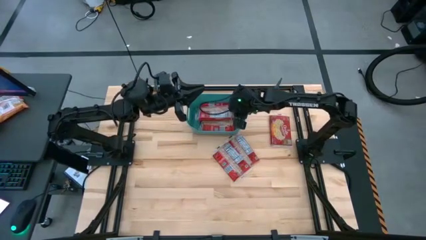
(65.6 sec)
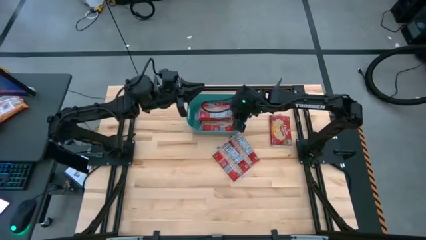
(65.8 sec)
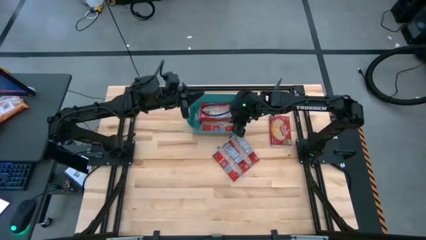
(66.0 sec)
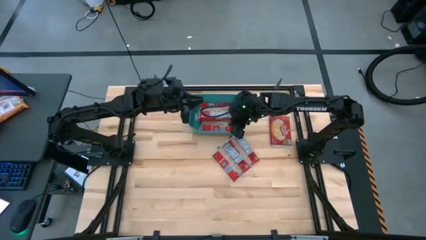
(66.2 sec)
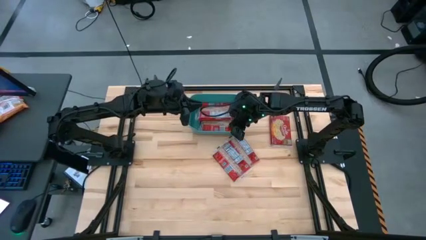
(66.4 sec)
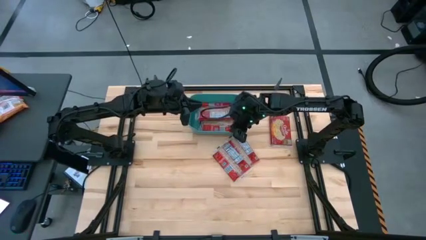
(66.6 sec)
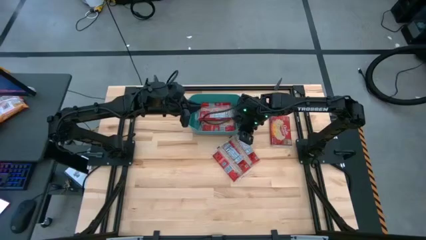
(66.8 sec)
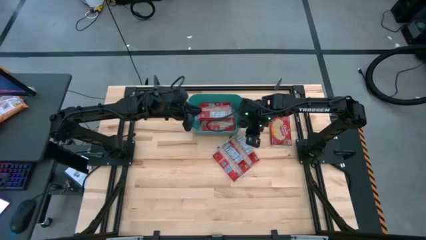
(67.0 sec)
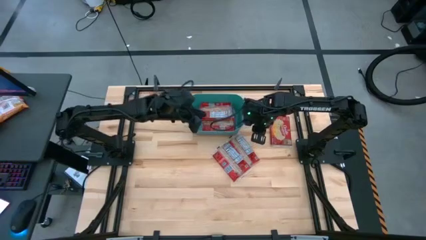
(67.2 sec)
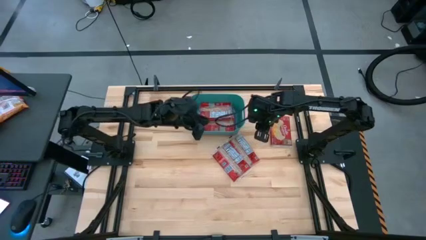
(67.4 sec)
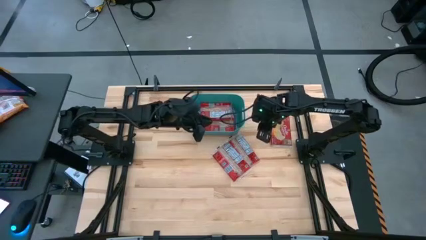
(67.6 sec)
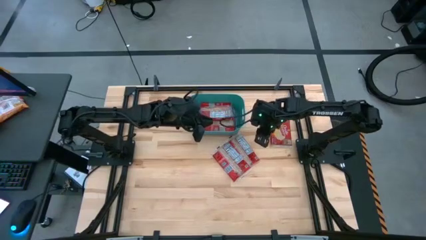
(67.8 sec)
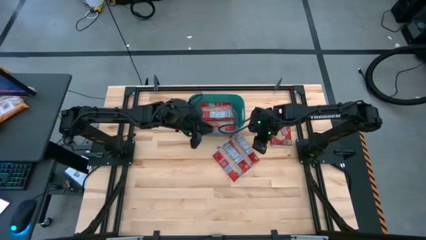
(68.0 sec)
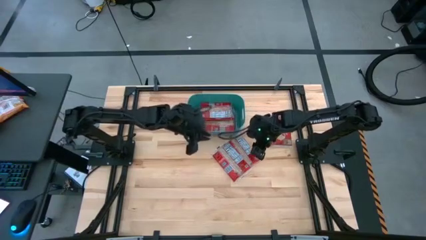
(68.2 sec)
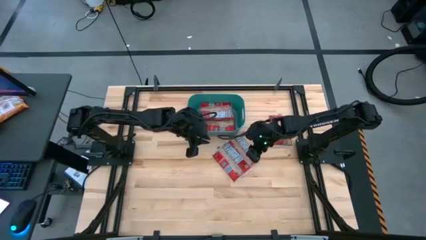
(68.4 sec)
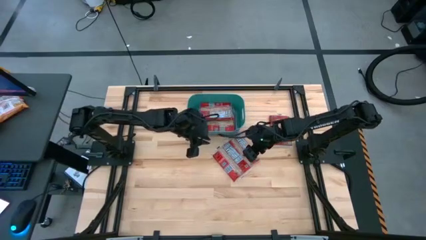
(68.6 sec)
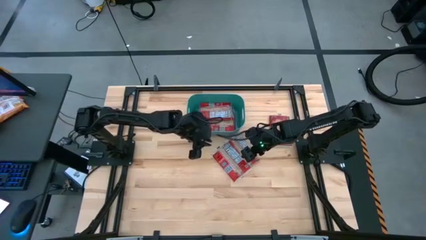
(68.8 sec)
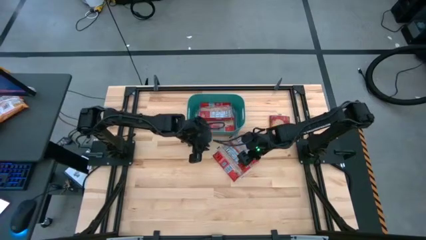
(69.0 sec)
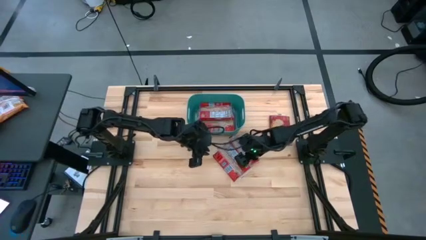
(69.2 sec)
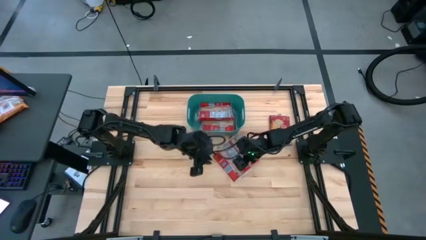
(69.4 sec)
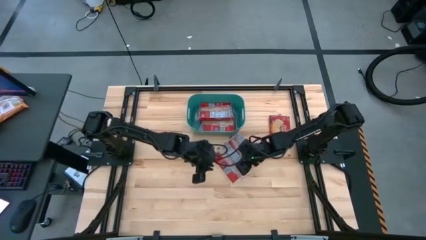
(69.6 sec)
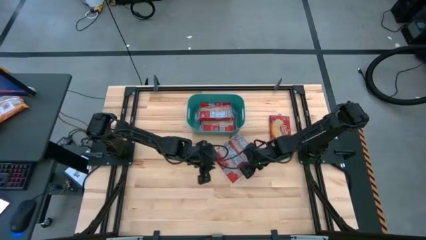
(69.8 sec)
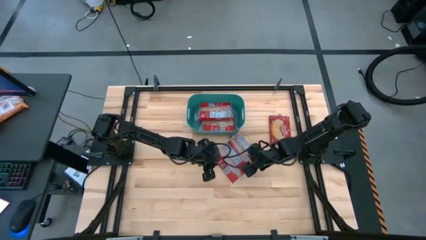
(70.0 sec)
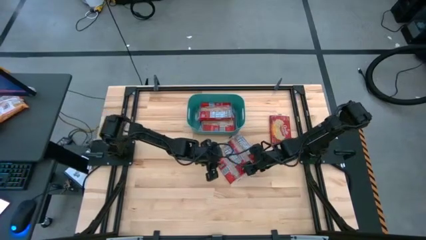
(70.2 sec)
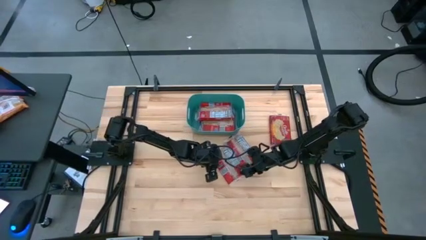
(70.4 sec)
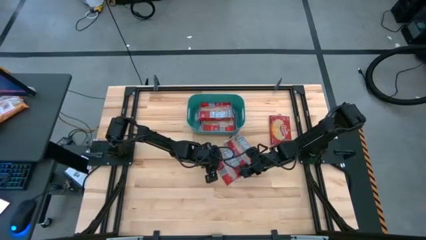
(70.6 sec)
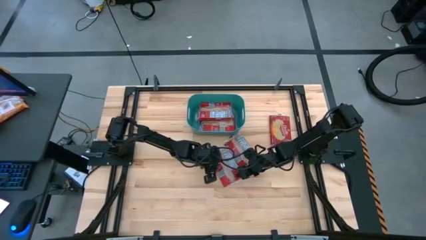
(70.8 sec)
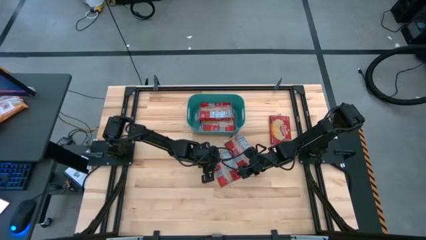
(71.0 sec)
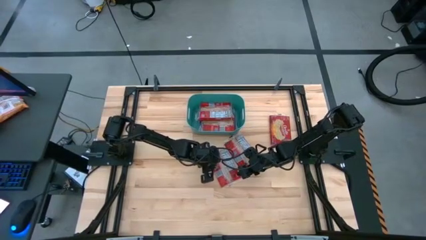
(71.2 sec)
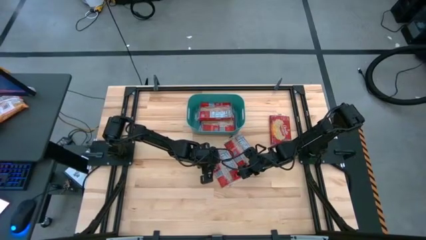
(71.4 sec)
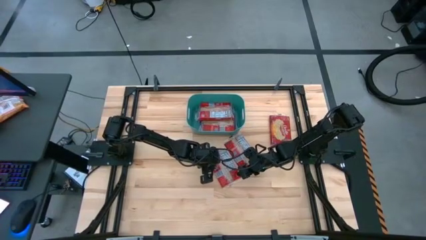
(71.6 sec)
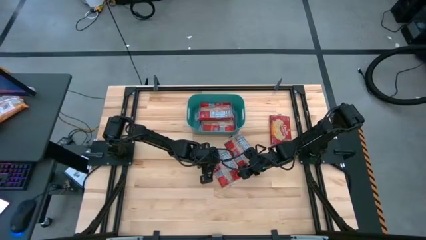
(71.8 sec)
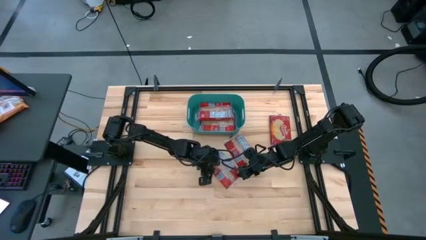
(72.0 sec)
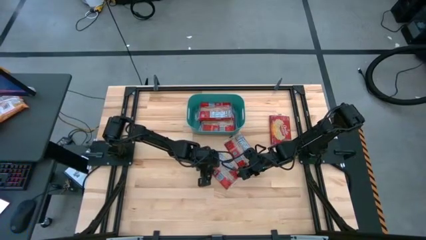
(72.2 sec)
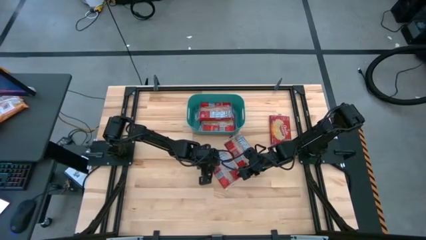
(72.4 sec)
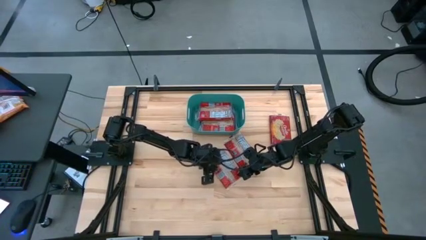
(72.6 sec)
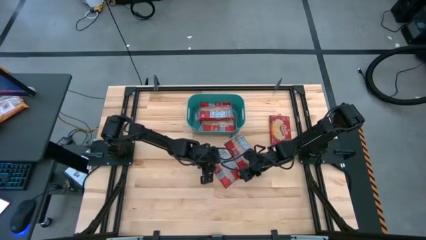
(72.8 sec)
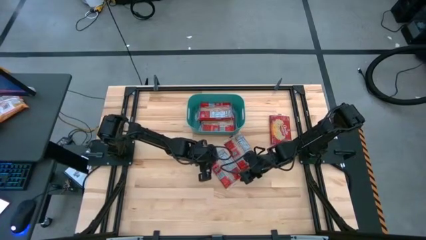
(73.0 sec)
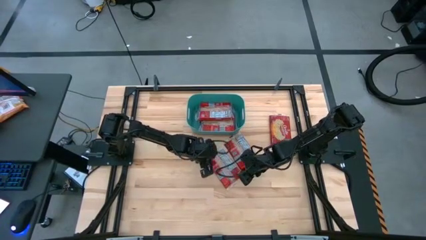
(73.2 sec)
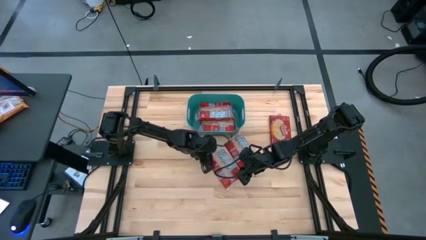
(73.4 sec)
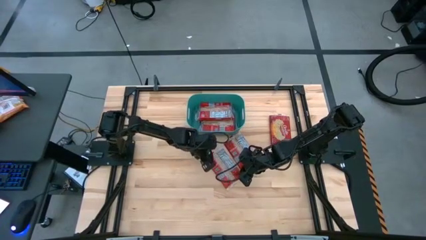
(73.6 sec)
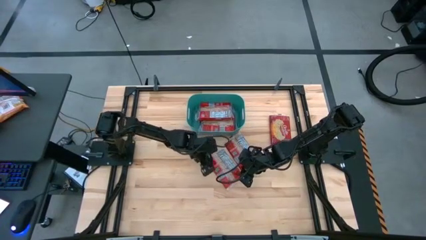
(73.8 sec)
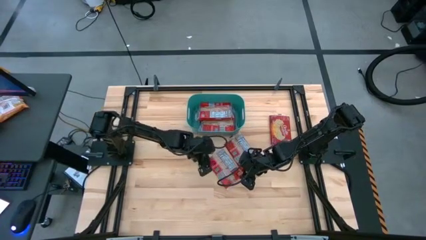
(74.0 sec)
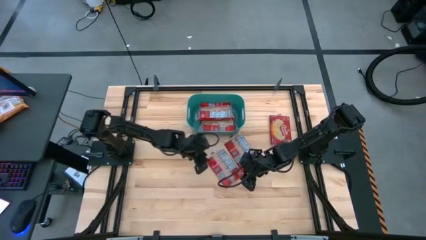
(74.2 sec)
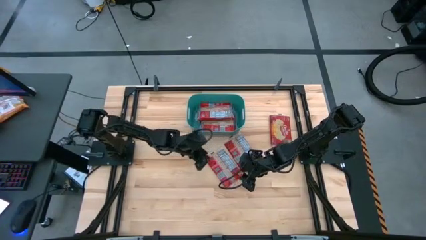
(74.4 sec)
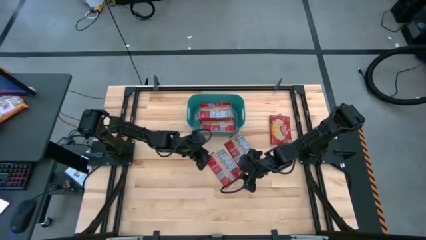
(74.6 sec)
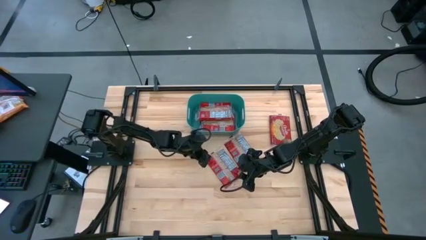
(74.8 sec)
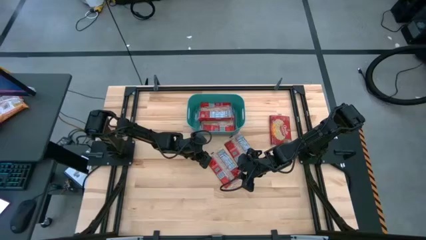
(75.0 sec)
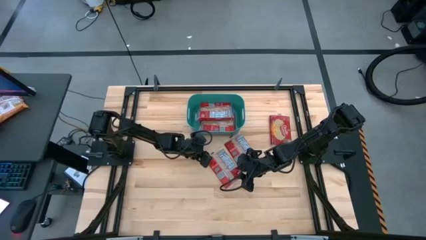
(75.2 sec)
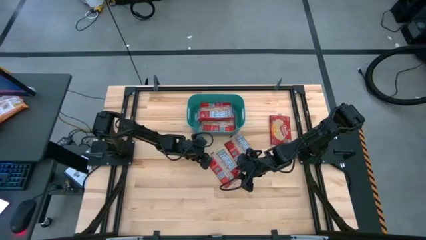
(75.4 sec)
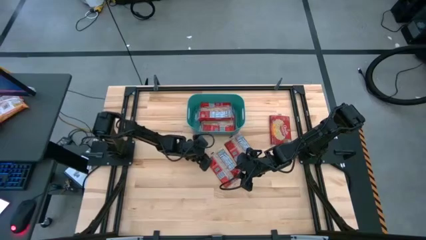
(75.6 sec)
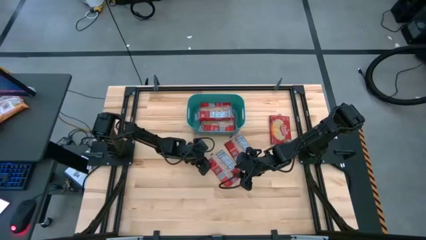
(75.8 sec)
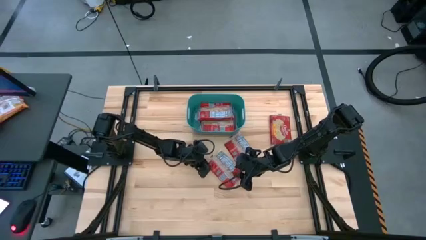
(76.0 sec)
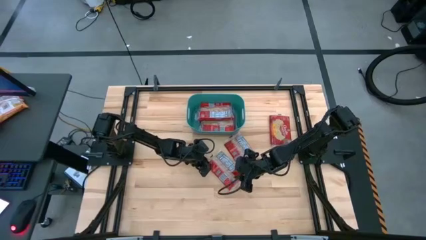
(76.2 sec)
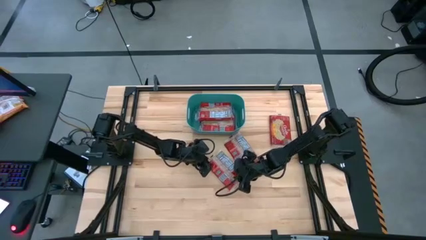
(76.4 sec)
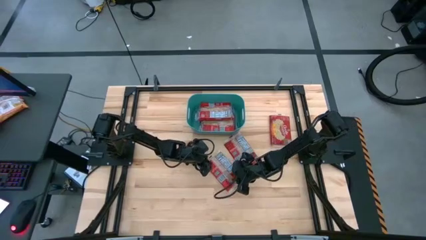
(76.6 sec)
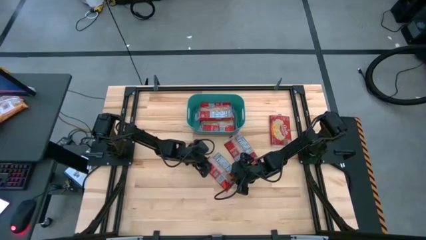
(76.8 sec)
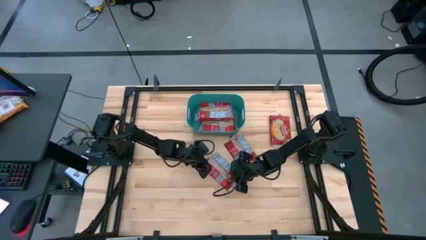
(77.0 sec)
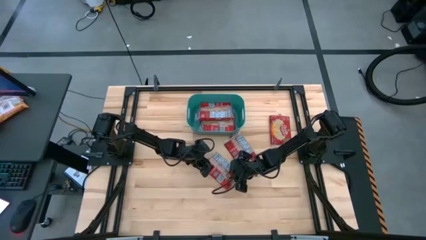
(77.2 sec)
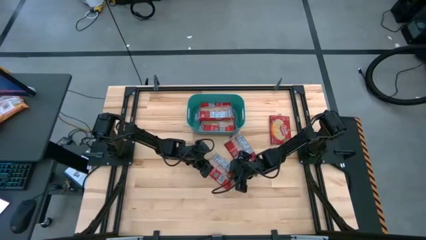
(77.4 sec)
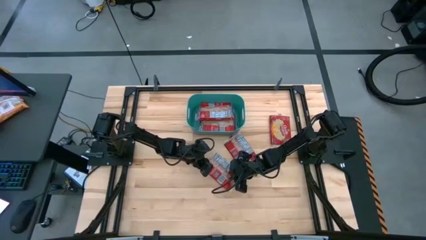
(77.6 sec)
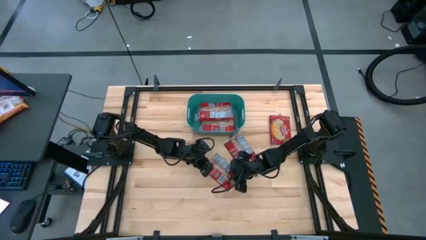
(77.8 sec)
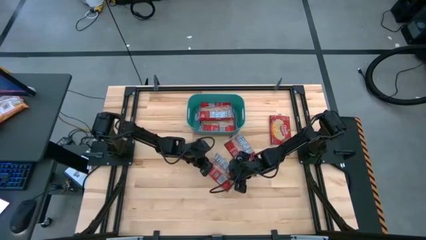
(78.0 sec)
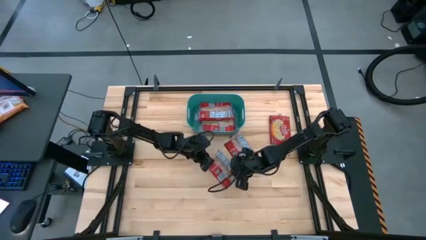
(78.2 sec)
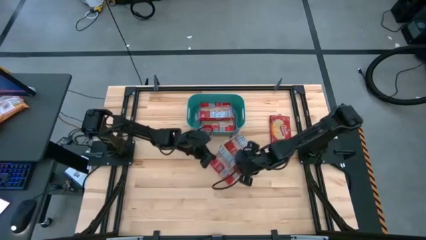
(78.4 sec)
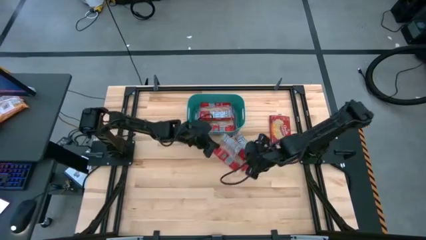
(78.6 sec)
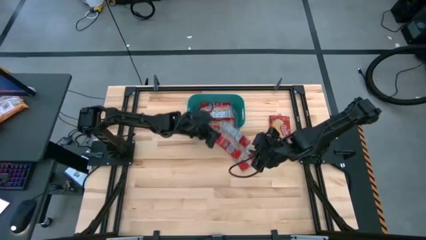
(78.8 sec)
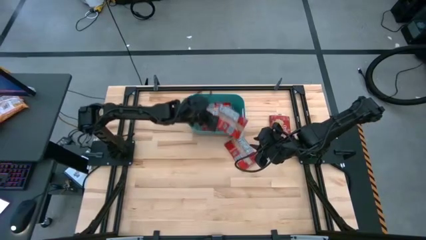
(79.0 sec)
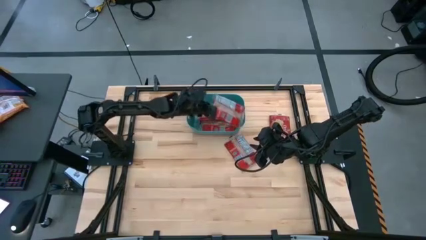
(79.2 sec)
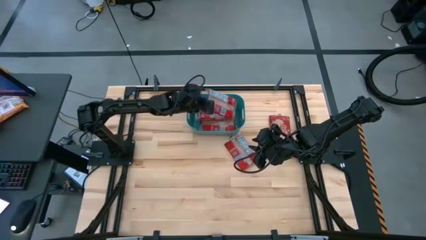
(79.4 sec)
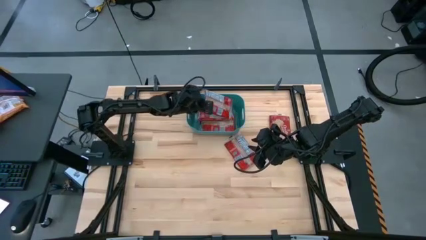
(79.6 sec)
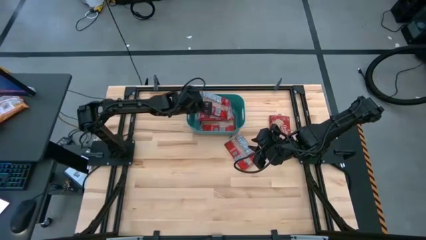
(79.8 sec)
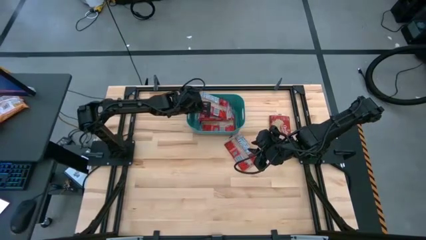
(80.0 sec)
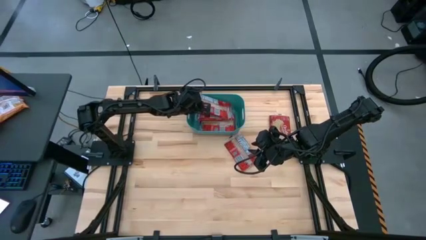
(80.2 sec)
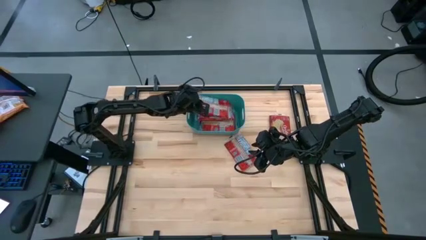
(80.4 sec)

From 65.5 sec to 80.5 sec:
Task: Sort popcorn bags into baskets
Put the red popcorn bag into the blue bin
